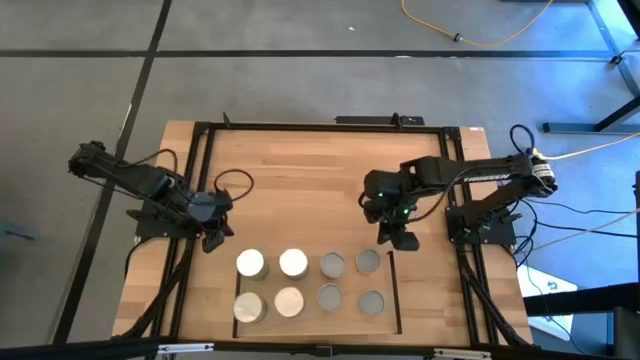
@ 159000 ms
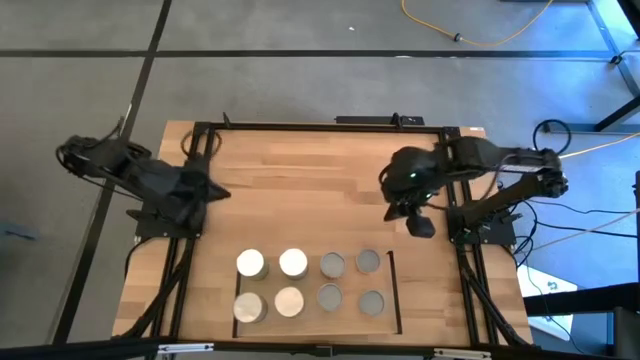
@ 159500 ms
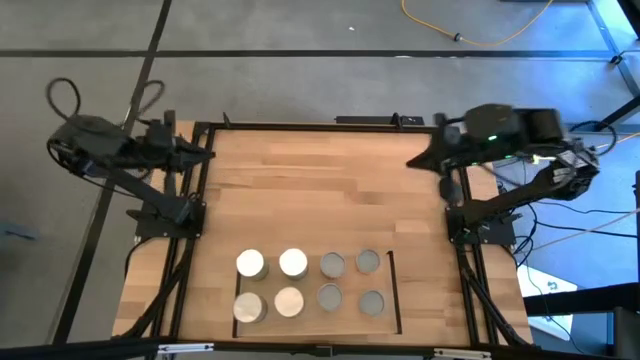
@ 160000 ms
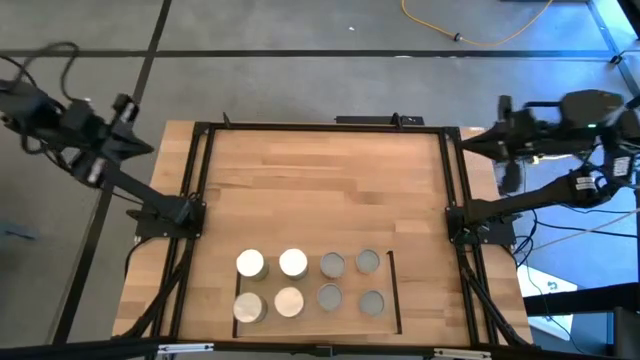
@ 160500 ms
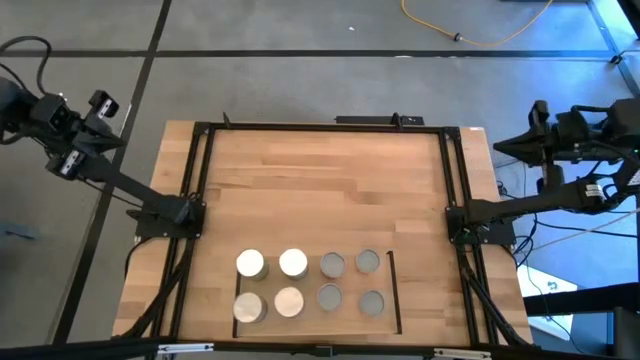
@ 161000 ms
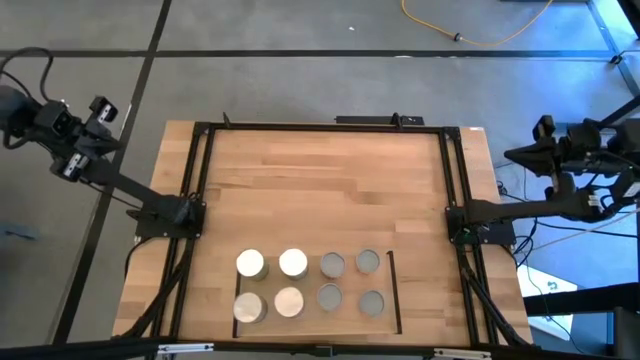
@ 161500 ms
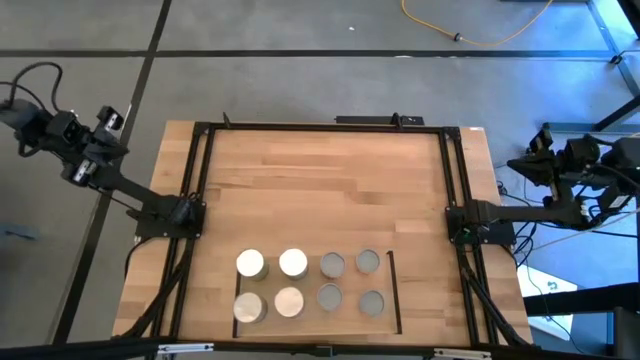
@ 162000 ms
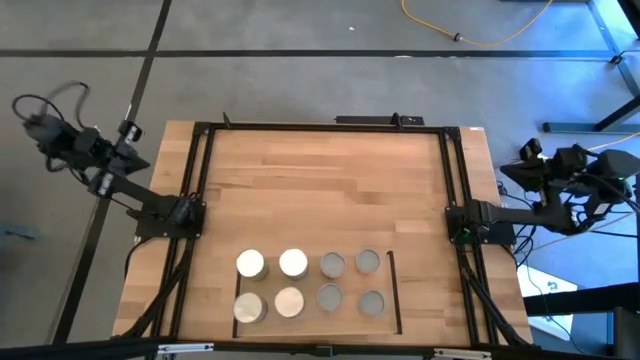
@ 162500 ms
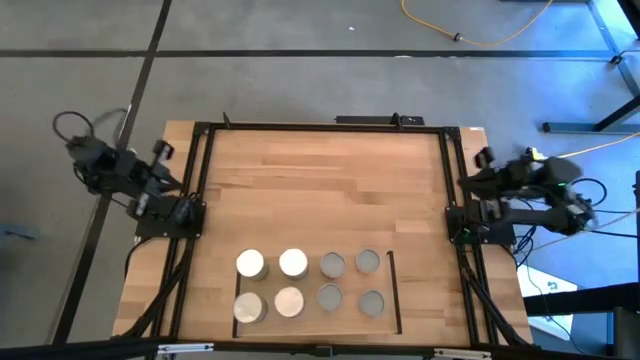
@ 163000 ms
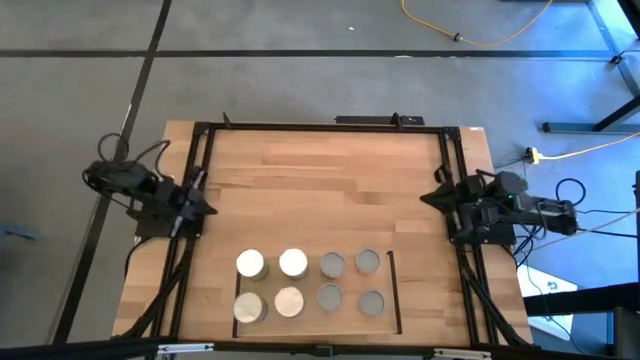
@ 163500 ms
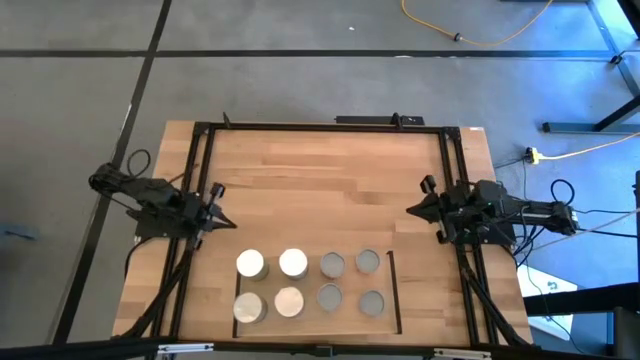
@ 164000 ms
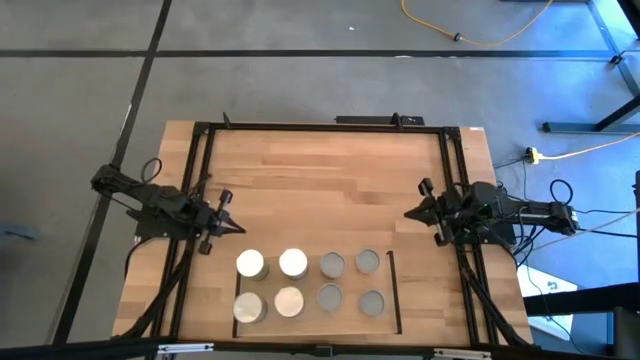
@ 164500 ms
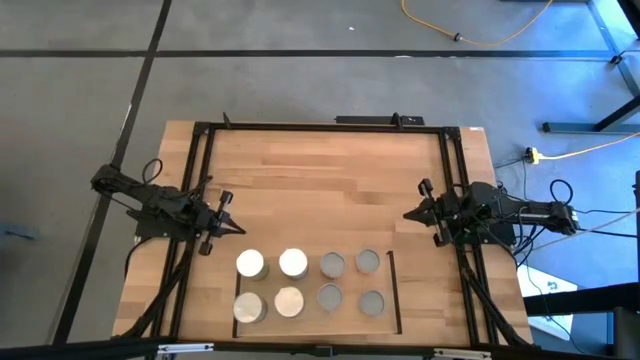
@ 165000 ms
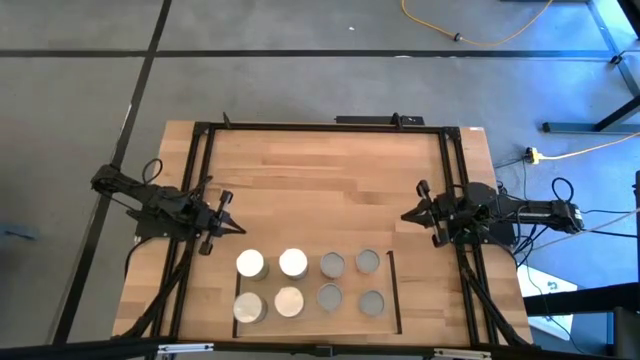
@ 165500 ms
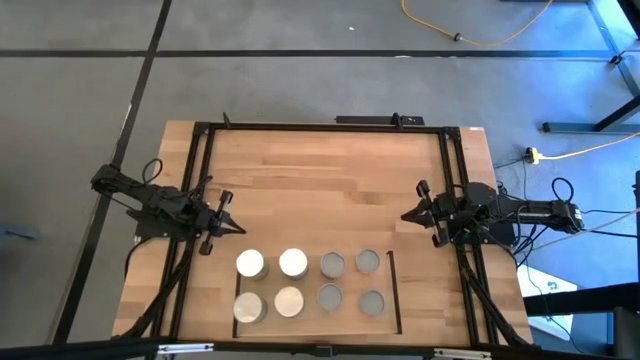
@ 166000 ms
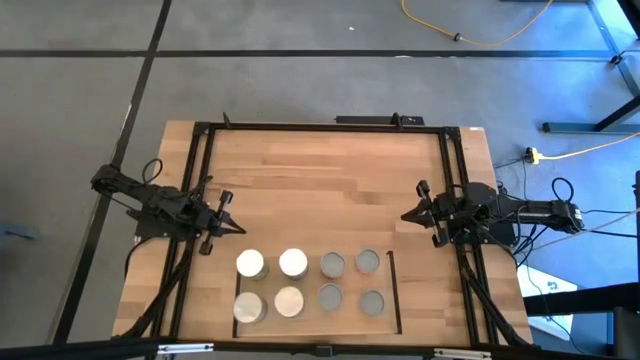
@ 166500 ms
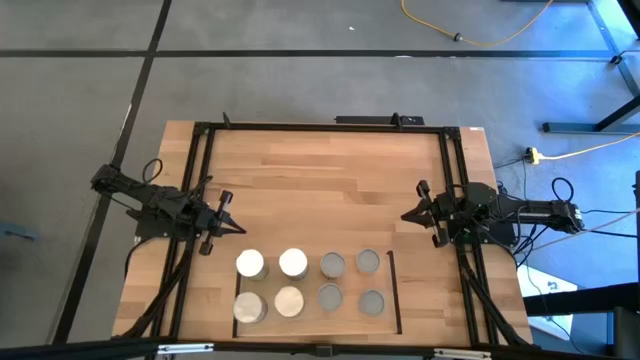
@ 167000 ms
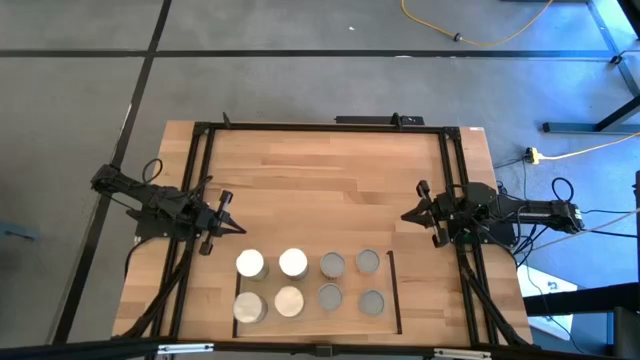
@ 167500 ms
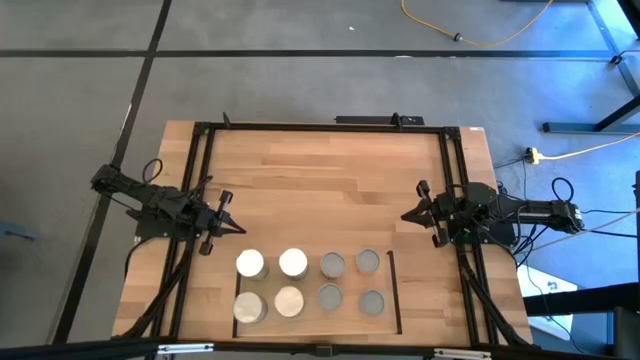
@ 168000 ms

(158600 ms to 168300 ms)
Task: Pick and place cans onto a shelf
Return to Home Position

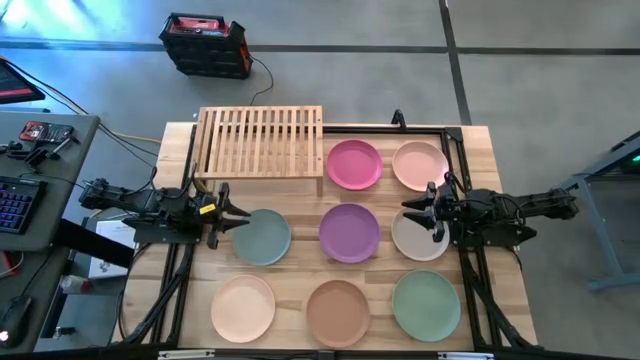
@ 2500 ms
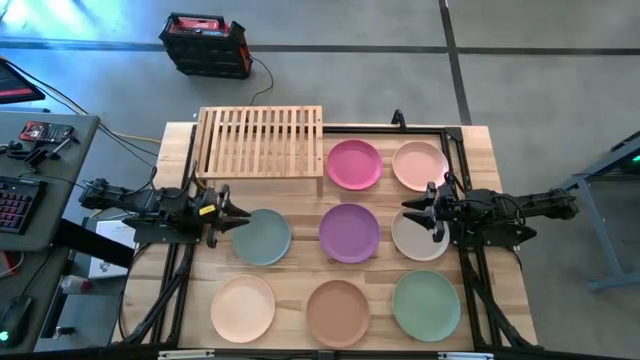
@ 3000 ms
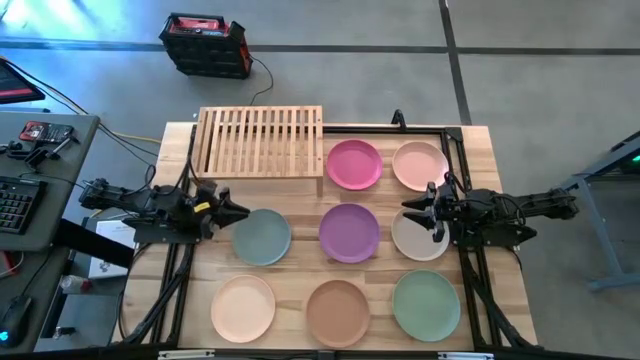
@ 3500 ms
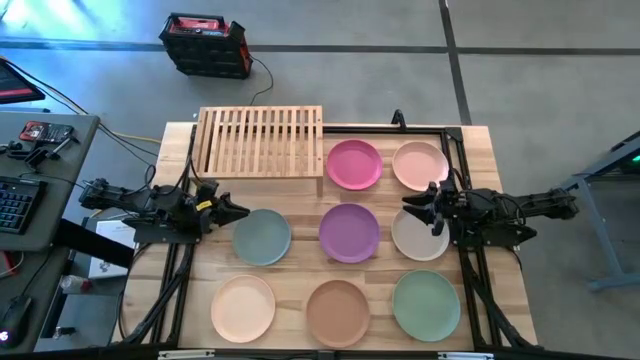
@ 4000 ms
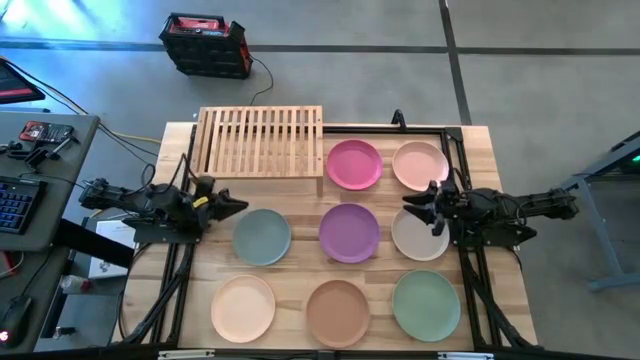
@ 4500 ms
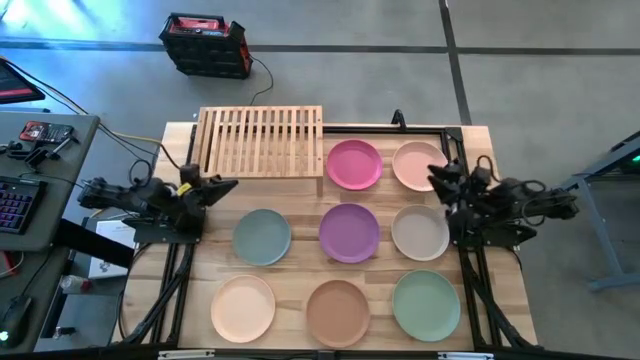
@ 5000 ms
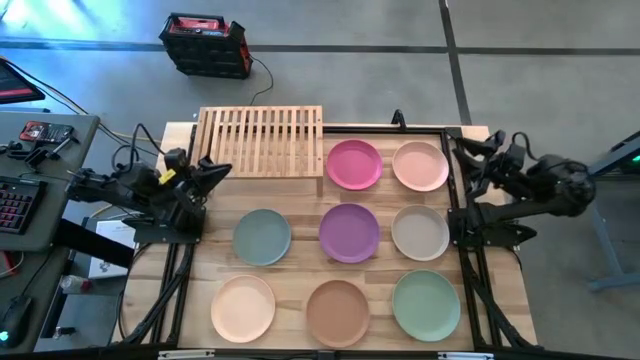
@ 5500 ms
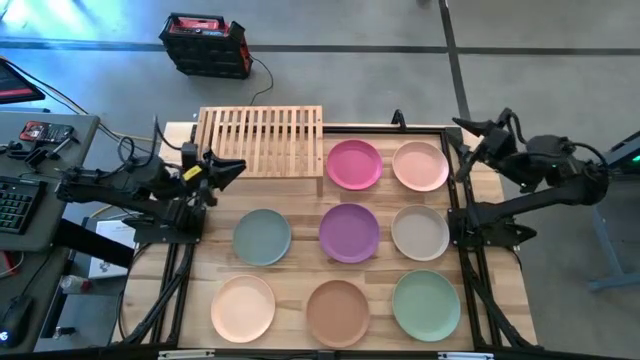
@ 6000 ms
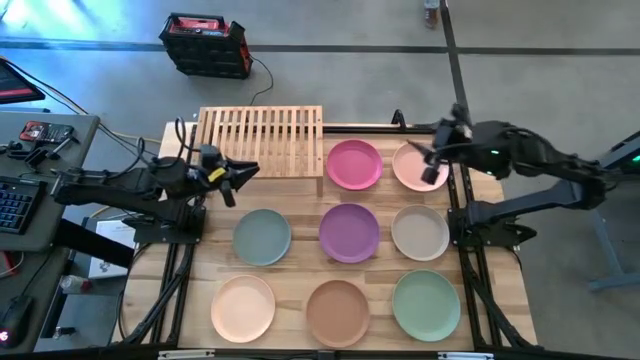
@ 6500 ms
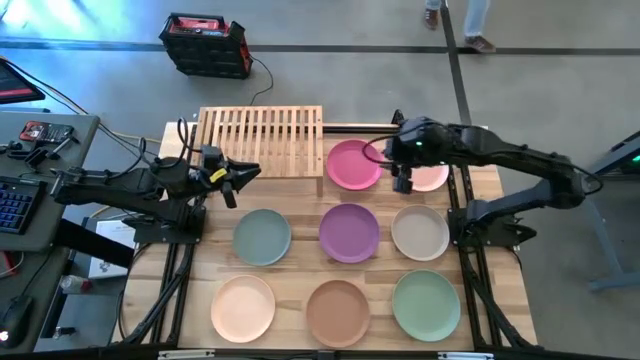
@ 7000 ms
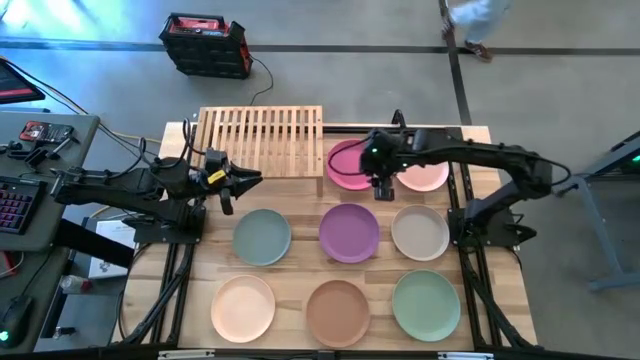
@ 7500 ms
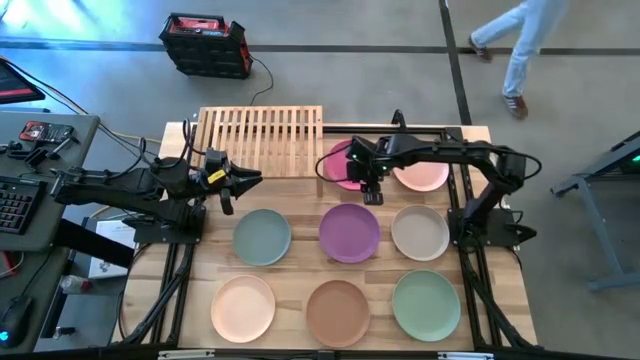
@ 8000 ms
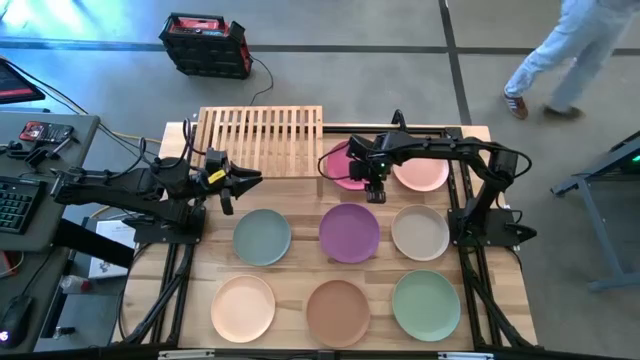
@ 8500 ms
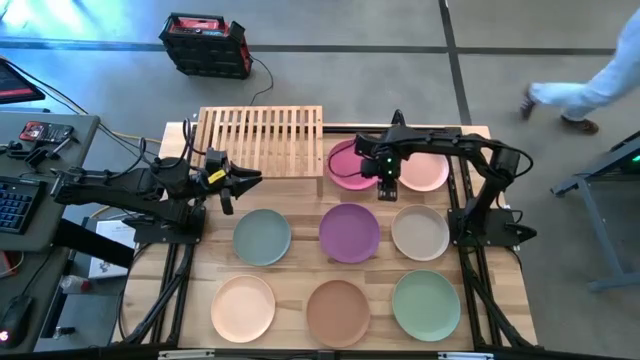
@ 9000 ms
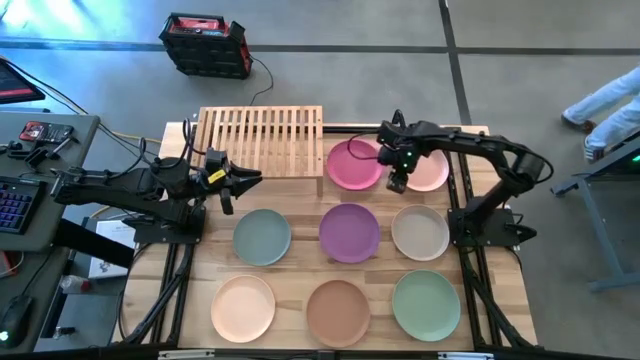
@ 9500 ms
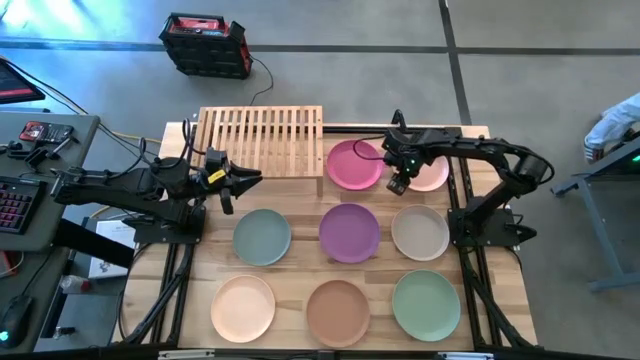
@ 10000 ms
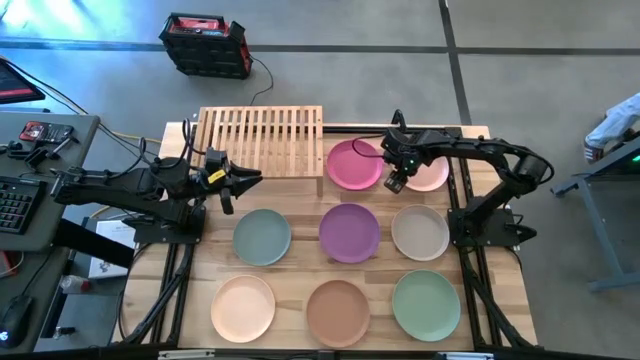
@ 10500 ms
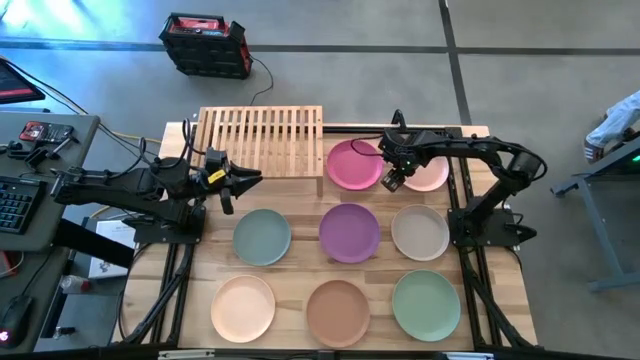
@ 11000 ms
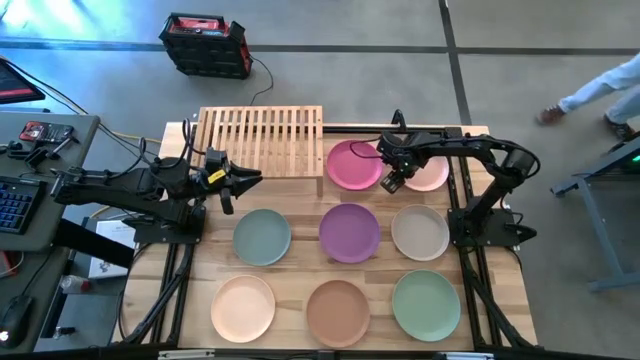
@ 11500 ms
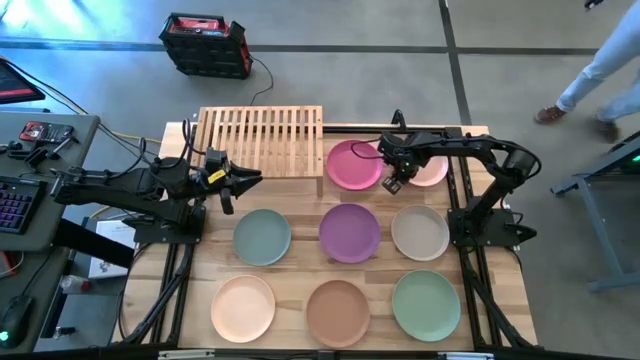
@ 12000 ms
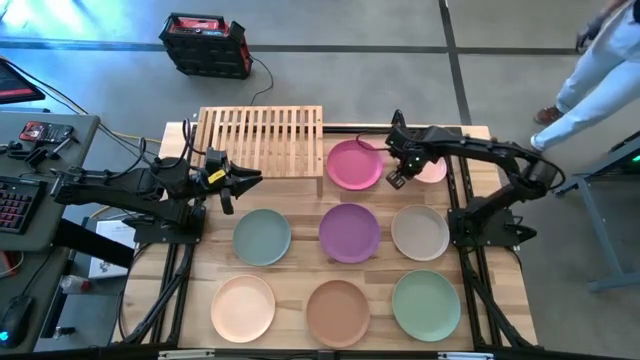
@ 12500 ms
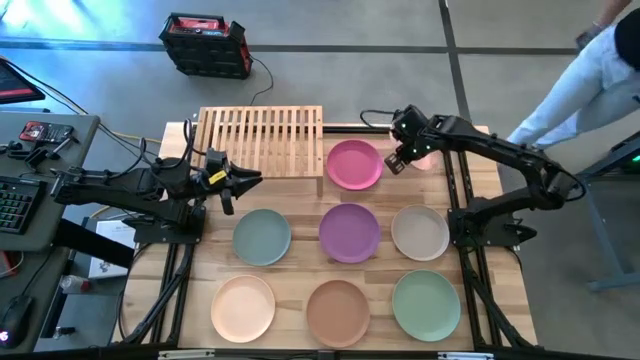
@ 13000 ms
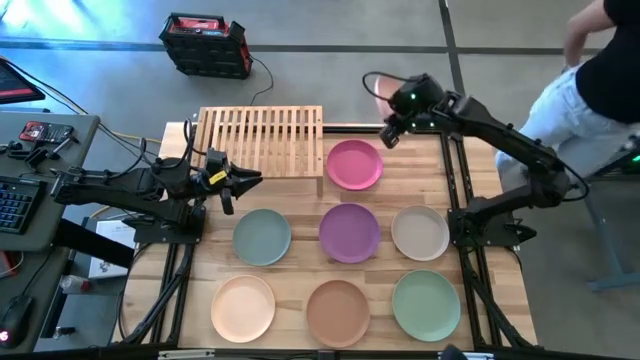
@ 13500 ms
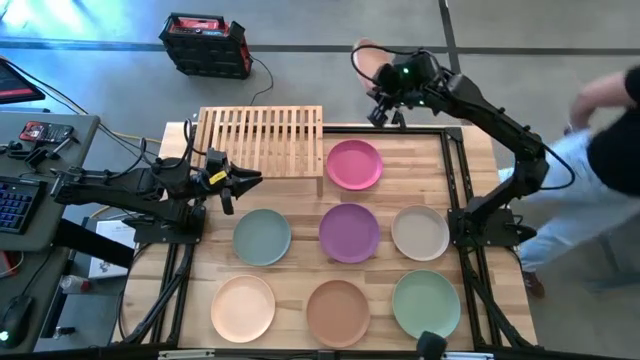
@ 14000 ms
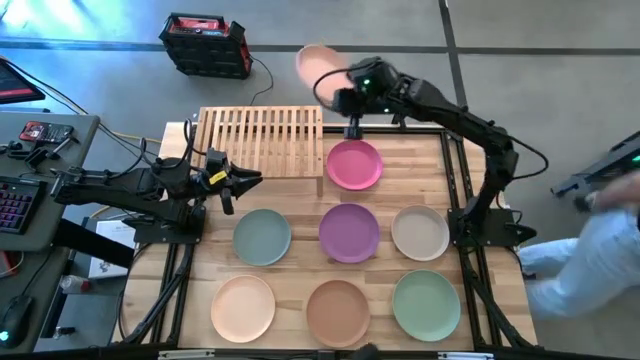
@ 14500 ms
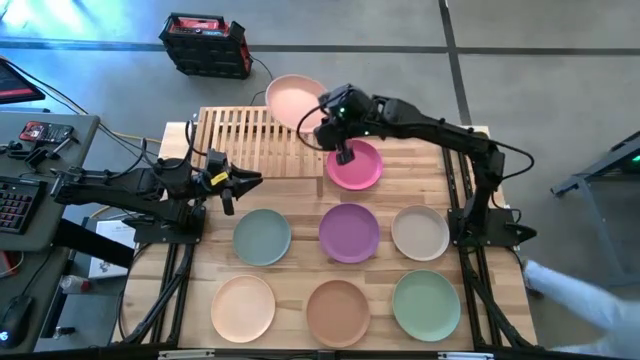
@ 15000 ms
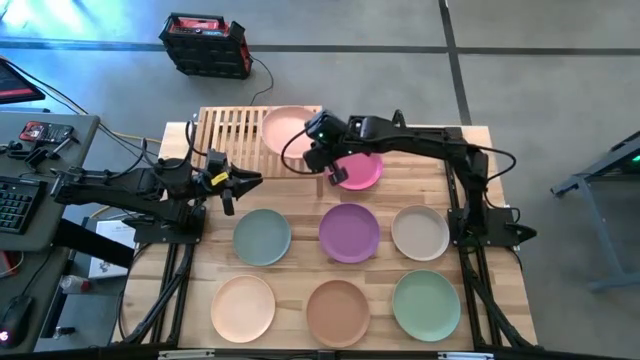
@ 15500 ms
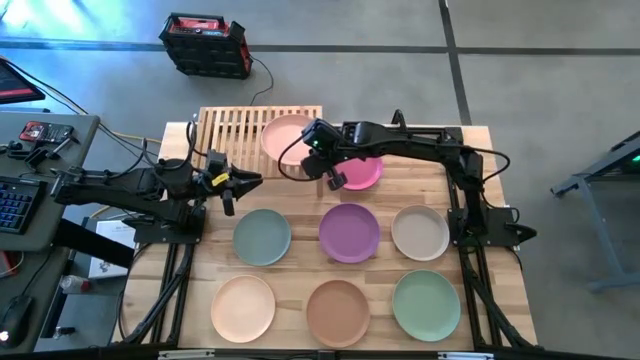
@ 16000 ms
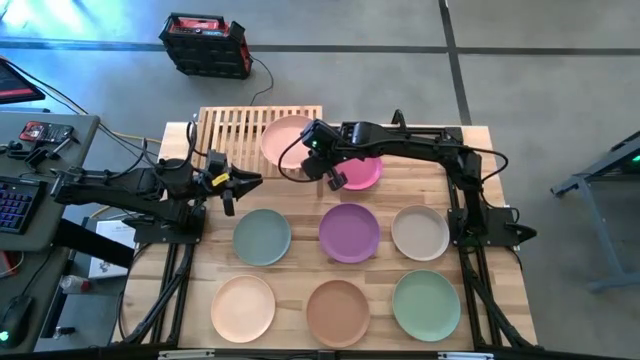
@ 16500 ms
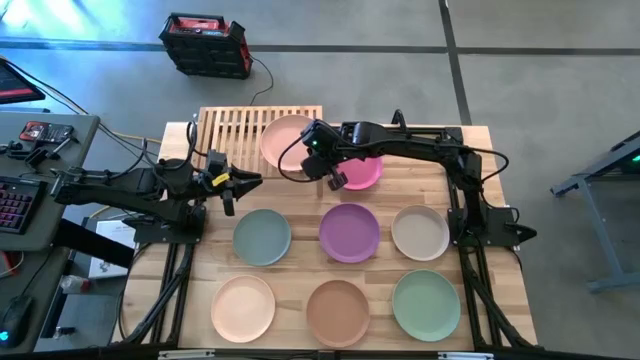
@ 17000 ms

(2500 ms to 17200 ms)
Task: Place and stack plates onto a shelf
Put the orange plate on the shelf
